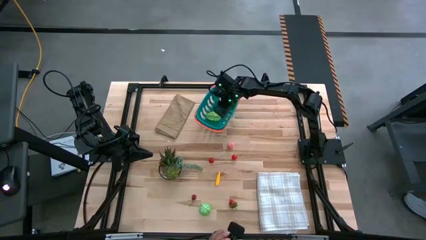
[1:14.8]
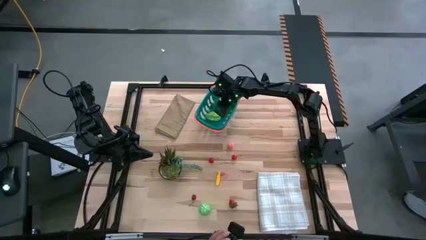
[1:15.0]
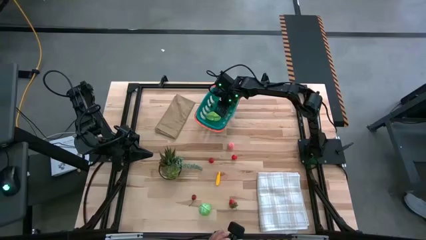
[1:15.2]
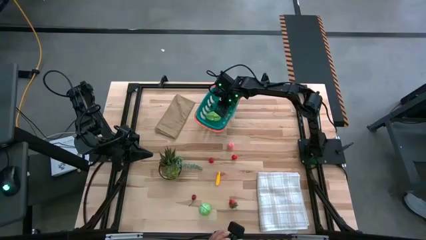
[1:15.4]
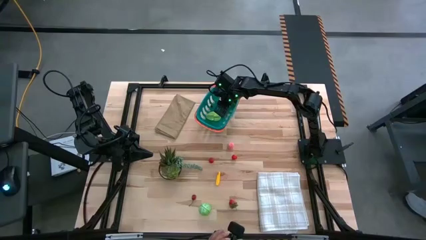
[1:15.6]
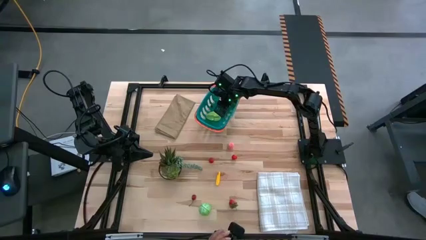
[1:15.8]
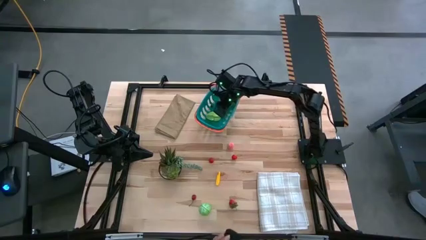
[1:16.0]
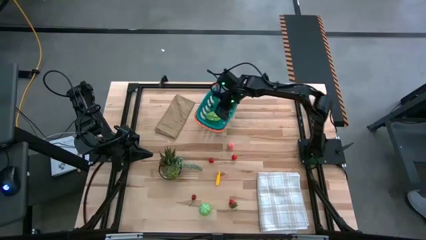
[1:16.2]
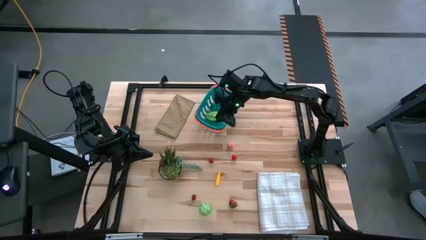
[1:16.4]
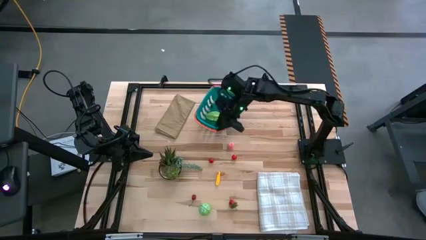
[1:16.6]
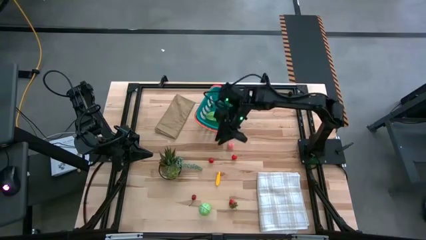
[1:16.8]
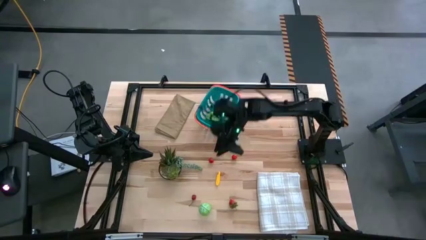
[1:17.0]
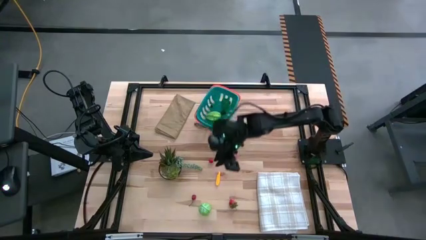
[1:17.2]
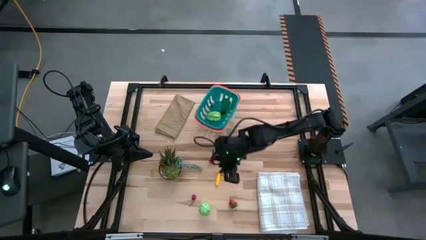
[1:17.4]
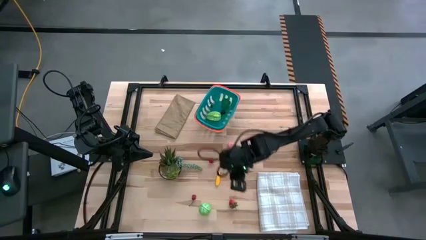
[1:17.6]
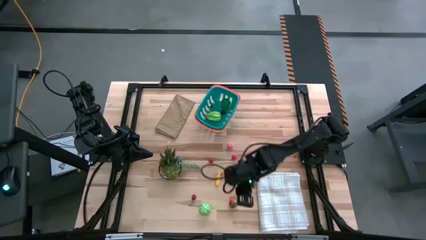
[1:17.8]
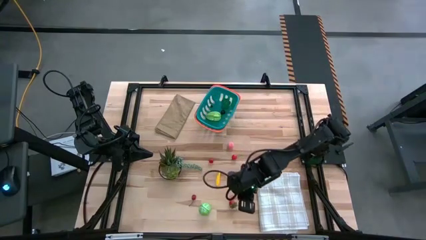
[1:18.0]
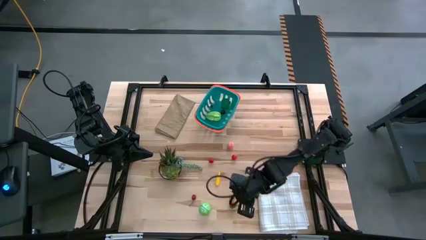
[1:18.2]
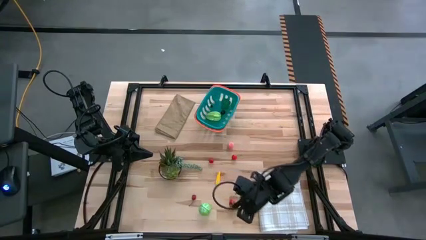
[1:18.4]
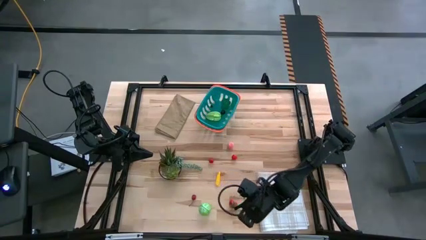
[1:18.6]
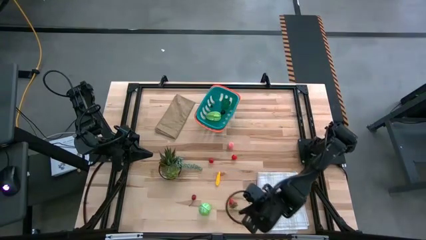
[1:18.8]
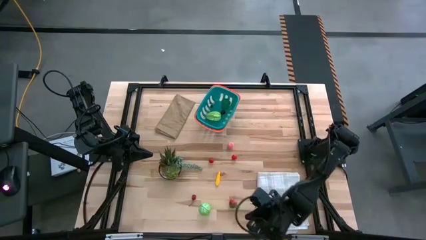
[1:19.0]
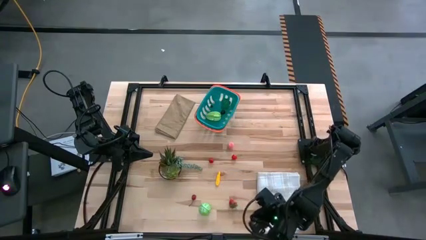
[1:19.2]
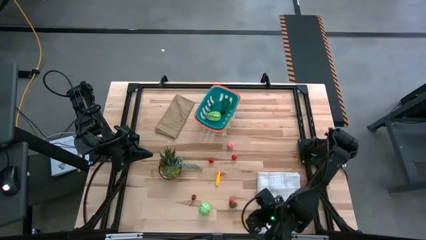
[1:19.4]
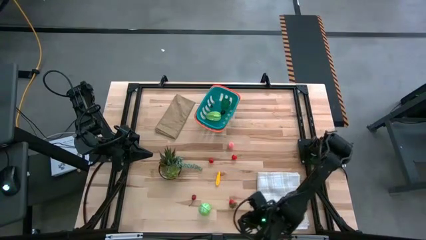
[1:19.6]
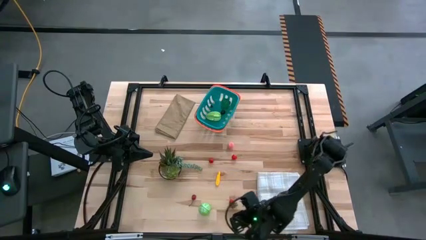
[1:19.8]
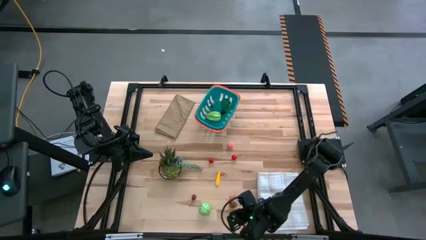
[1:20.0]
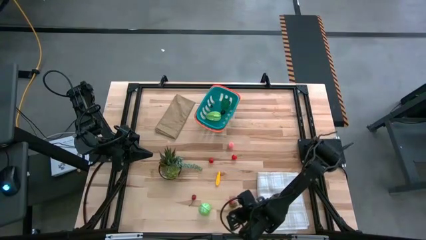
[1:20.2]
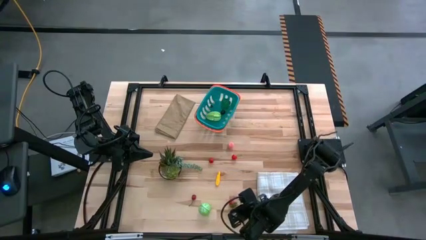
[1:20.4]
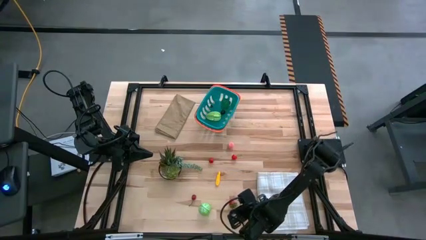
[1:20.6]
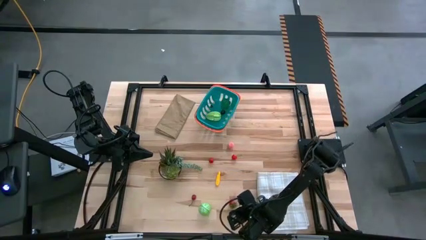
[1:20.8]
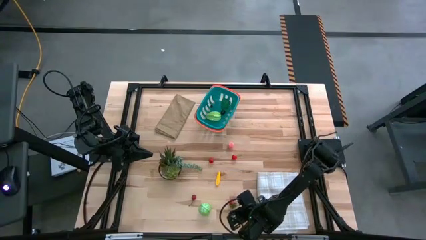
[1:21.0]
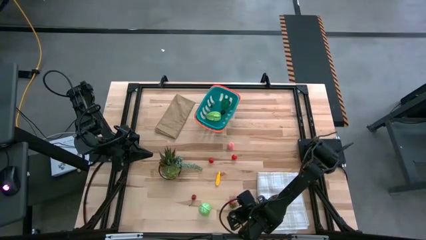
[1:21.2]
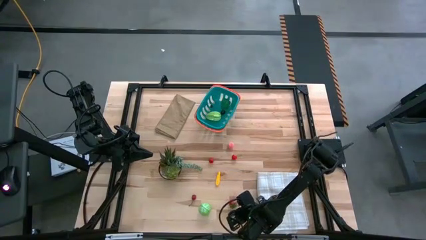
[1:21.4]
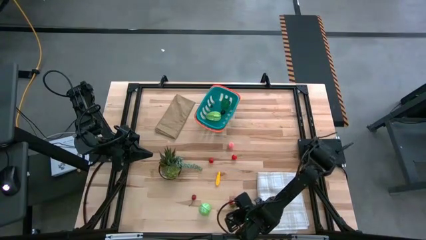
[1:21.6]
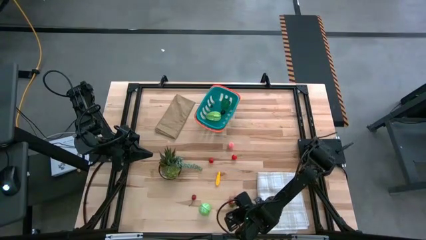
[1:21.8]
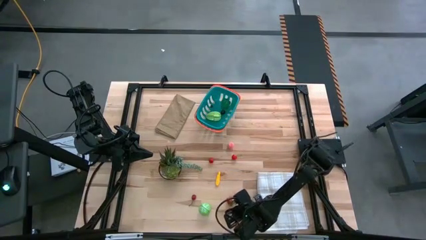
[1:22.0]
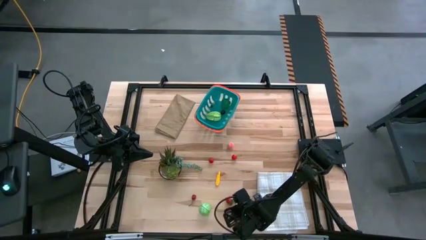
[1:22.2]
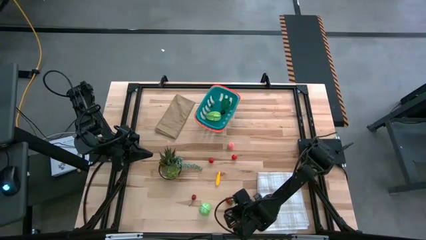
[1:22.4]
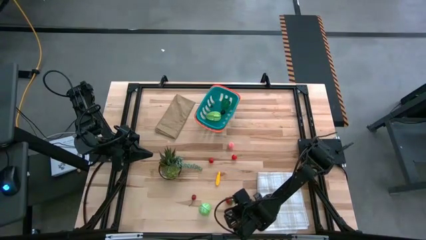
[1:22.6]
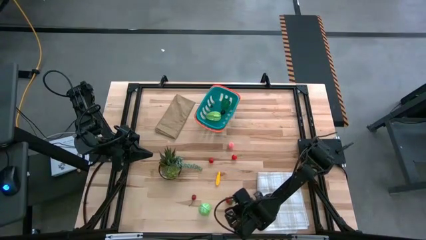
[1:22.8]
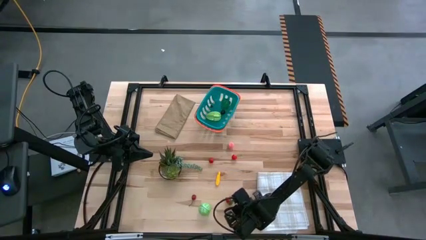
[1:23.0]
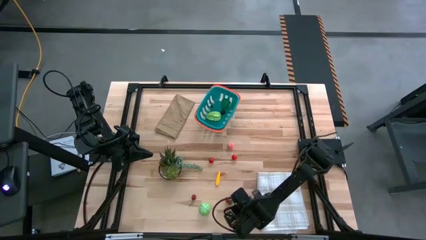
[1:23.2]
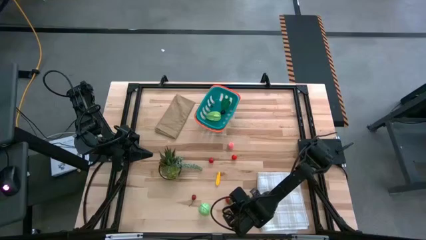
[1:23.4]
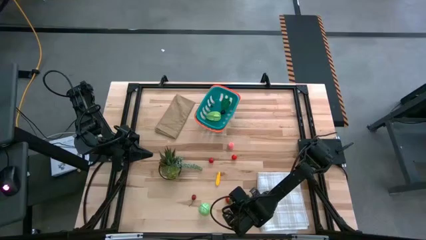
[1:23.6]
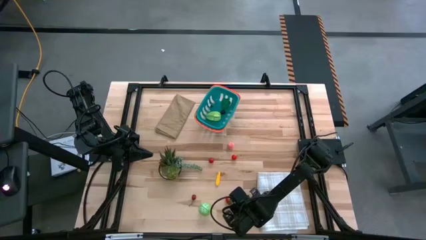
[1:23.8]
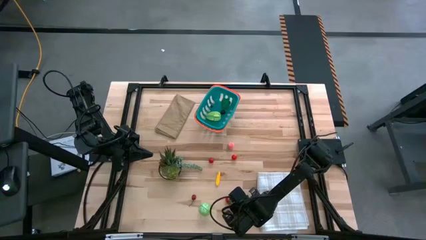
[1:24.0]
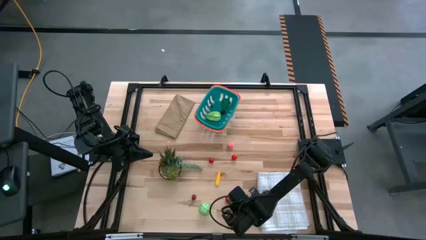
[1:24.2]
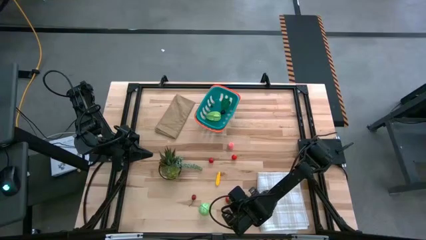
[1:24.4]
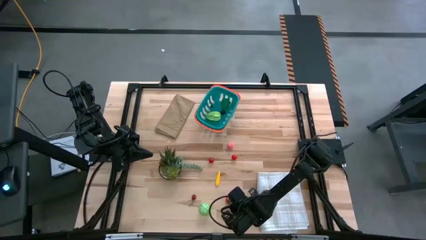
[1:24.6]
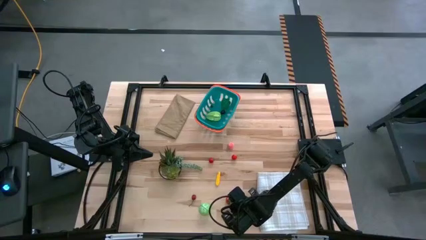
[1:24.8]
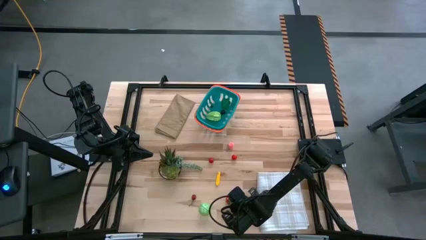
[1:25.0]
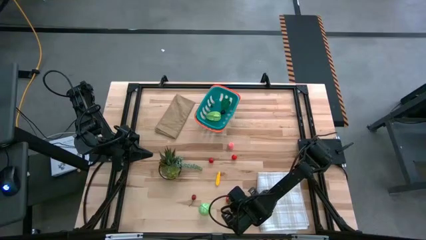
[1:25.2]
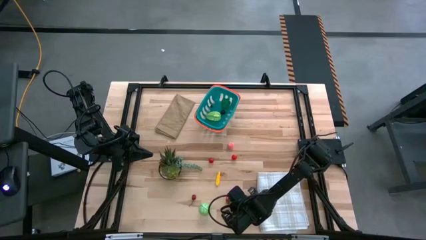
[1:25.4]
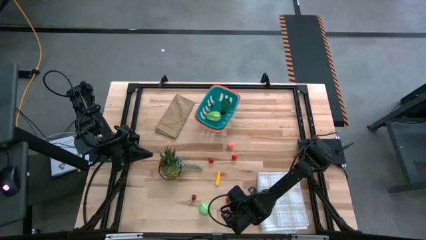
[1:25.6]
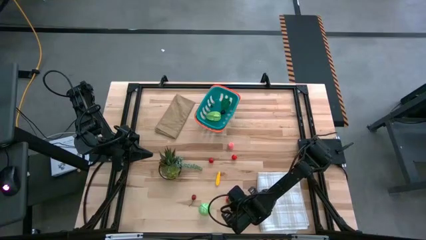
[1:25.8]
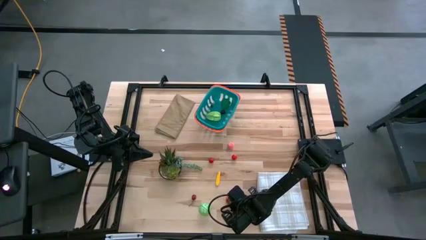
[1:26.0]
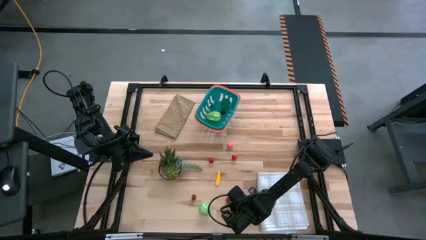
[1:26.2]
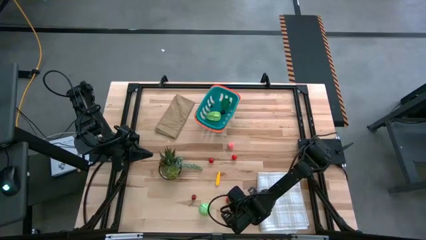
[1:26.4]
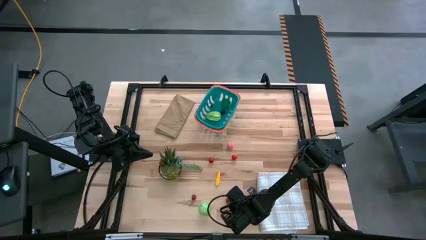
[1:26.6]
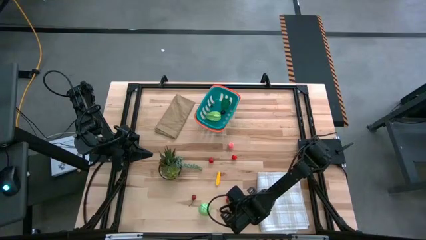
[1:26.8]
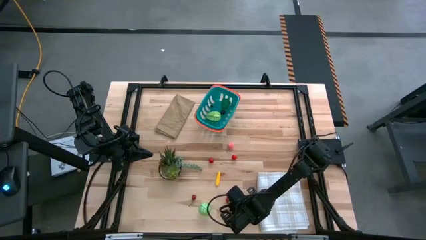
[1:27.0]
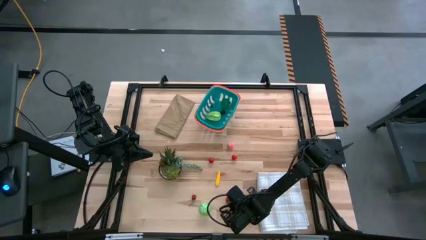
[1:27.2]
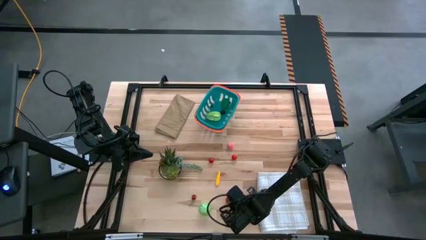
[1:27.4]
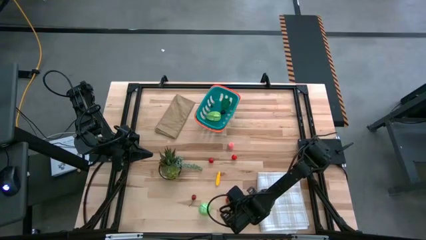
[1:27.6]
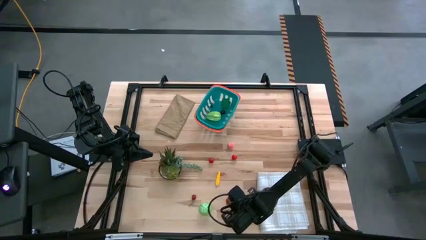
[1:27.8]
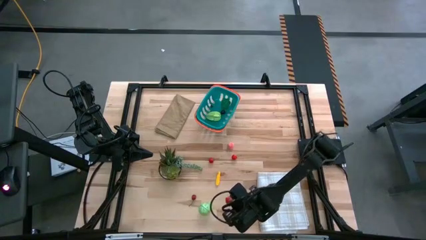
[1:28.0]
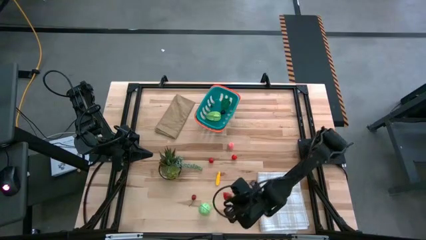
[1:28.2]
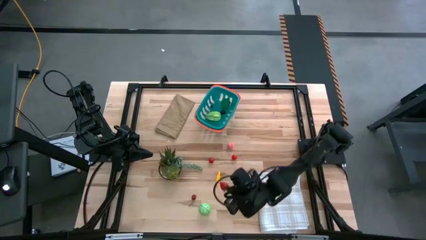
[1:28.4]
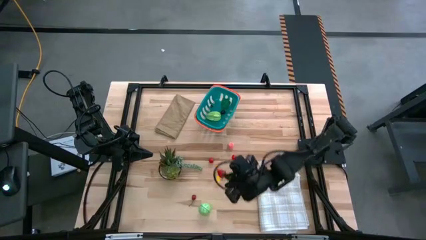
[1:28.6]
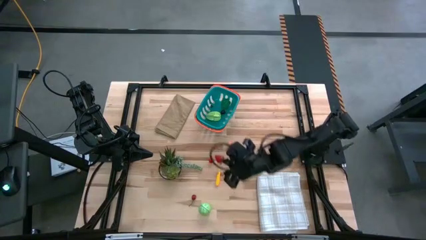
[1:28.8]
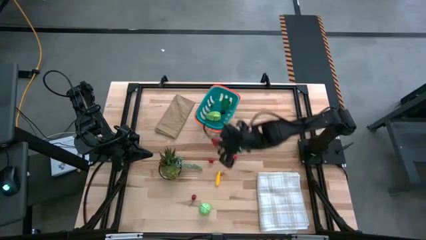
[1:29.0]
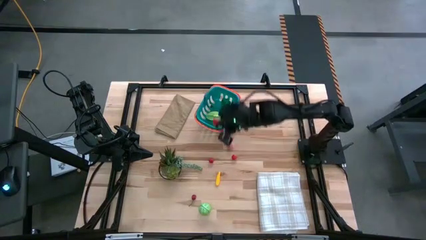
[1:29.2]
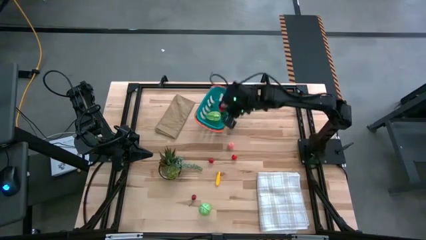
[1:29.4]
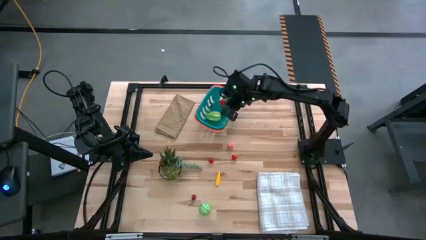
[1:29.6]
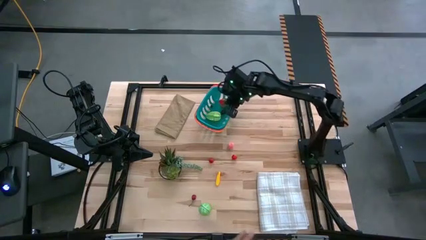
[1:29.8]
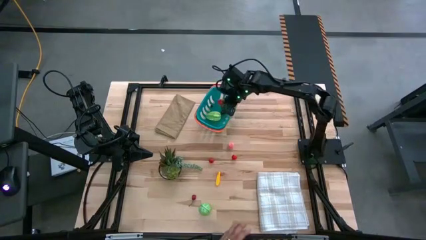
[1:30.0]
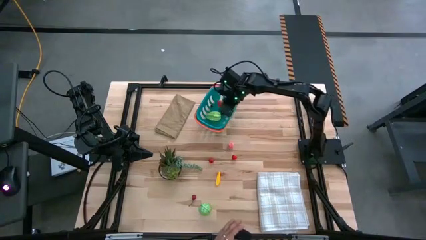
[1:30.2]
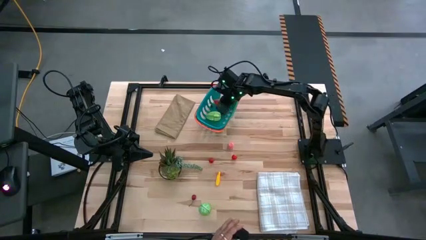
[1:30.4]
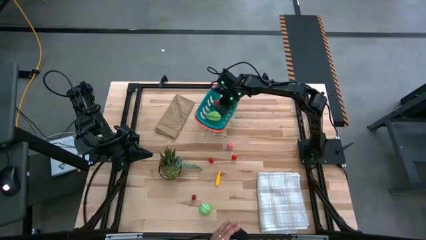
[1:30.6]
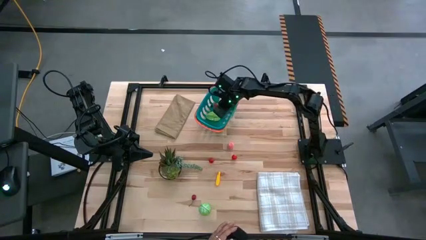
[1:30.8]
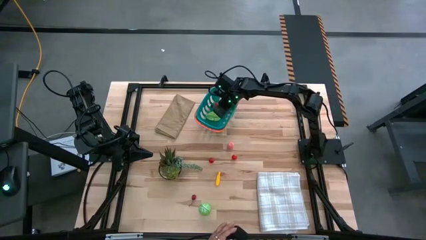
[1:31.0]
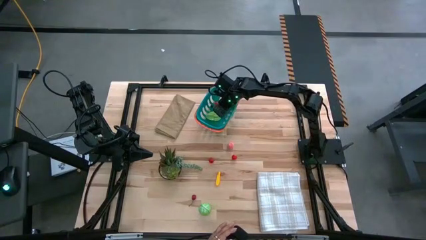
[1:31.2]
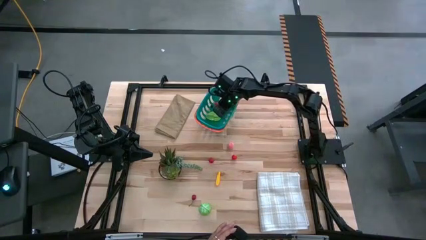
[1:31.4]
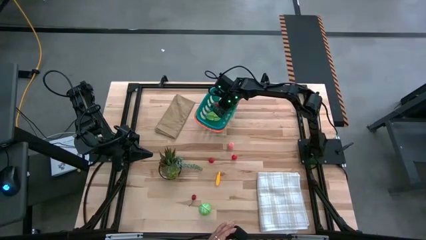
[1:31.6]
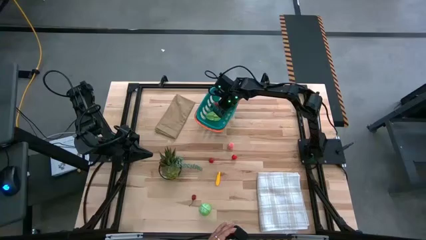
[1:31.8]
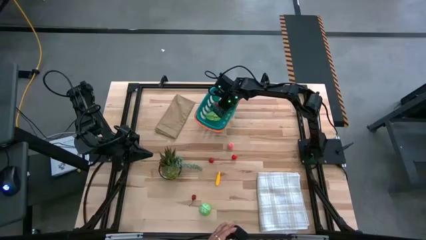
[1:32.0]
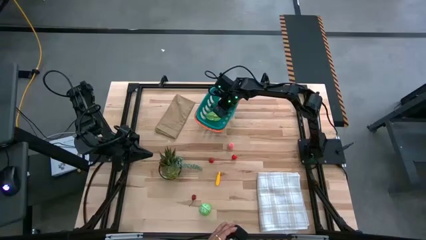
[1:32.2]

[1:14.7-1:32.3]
Task: Pick and placing Produce into tupperware
Put the red strawberry in the green basket
